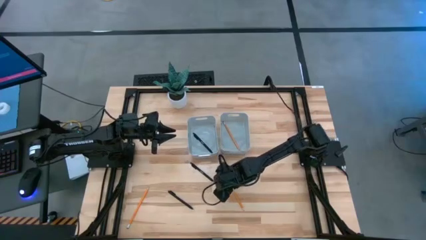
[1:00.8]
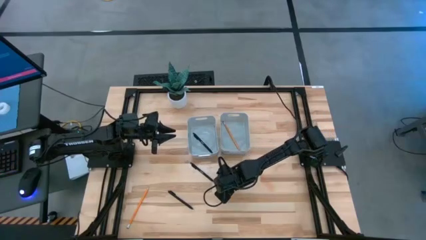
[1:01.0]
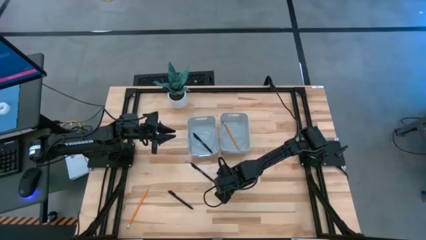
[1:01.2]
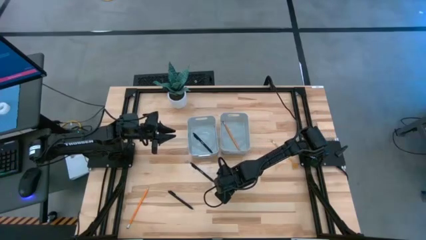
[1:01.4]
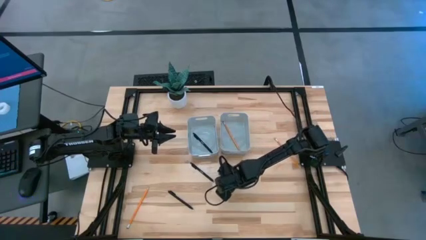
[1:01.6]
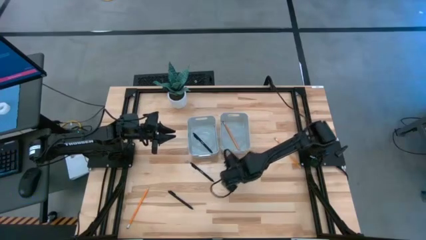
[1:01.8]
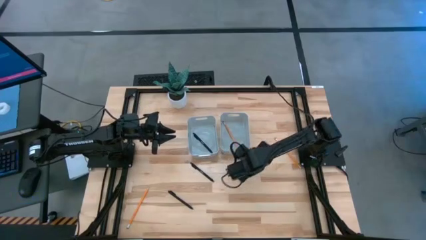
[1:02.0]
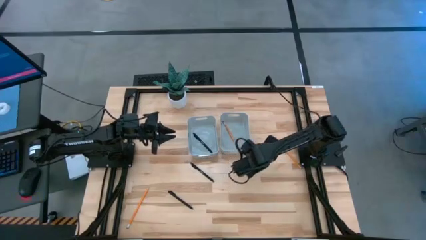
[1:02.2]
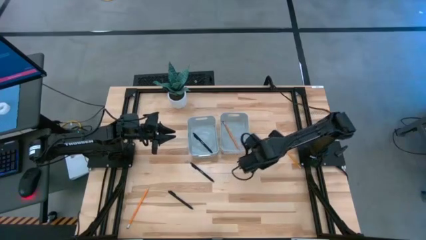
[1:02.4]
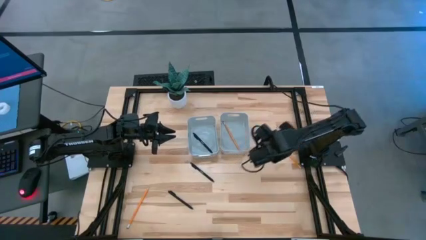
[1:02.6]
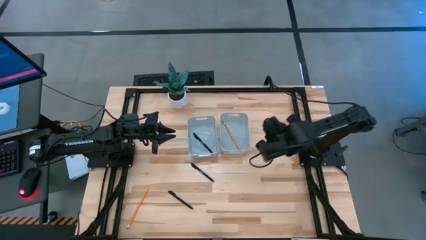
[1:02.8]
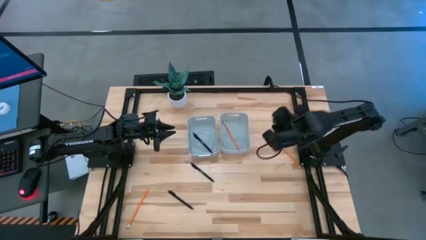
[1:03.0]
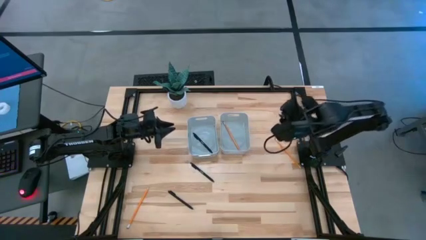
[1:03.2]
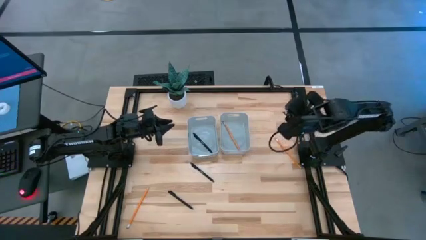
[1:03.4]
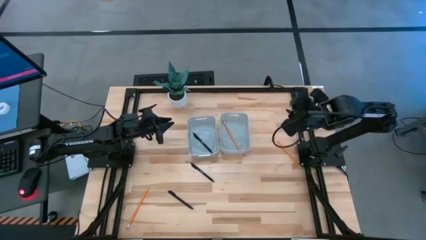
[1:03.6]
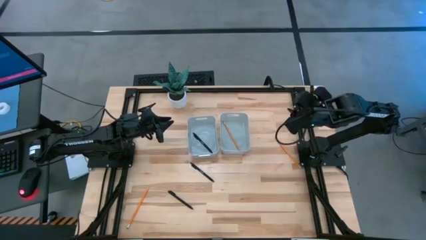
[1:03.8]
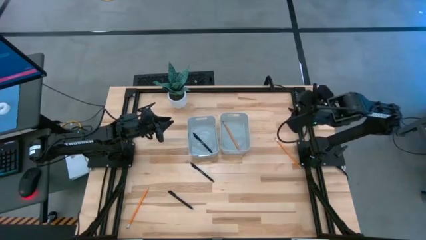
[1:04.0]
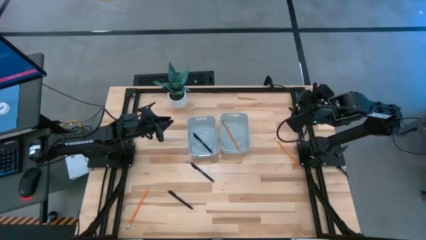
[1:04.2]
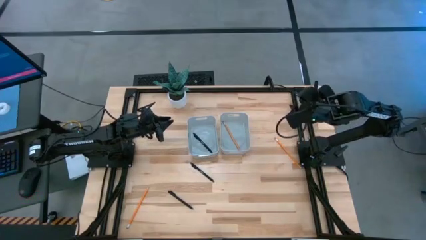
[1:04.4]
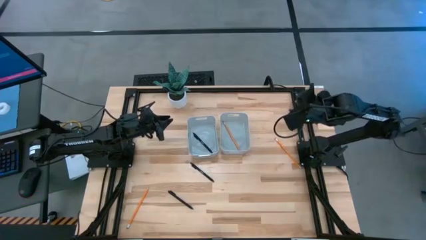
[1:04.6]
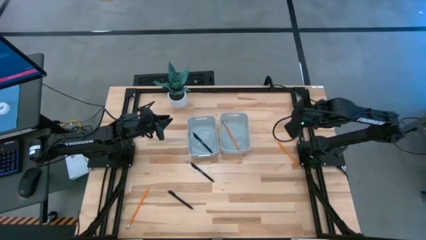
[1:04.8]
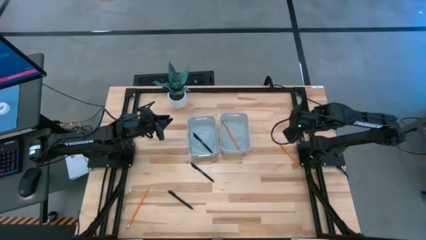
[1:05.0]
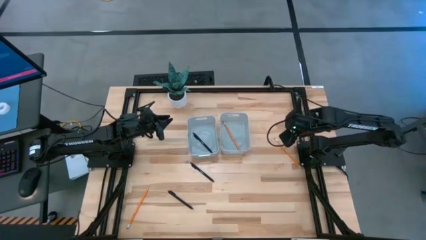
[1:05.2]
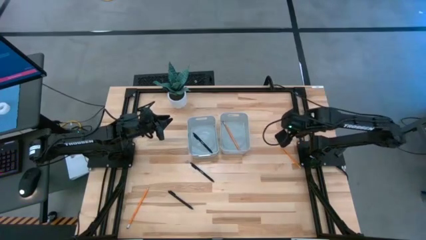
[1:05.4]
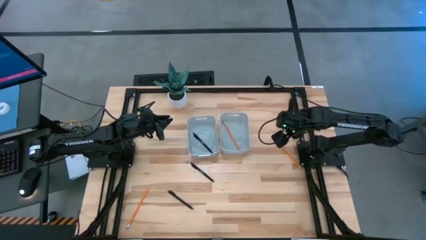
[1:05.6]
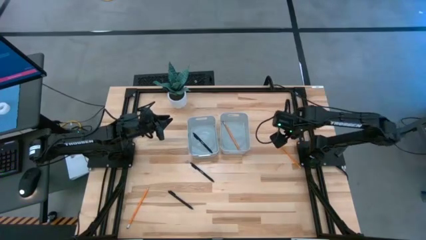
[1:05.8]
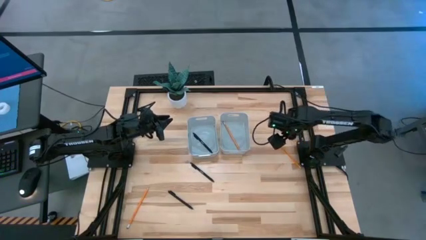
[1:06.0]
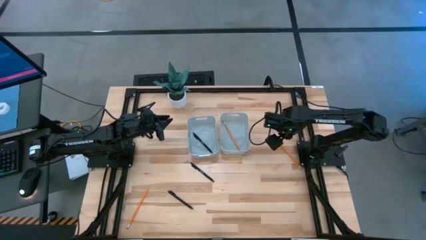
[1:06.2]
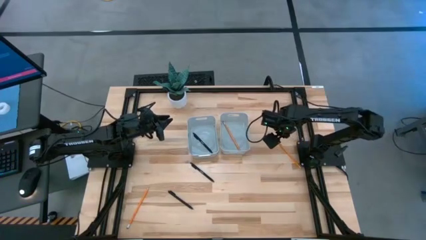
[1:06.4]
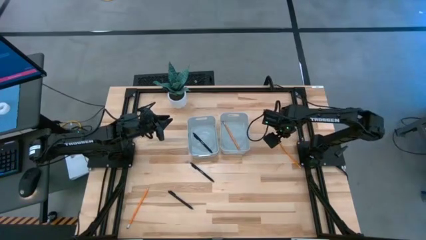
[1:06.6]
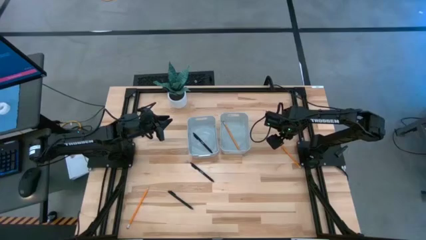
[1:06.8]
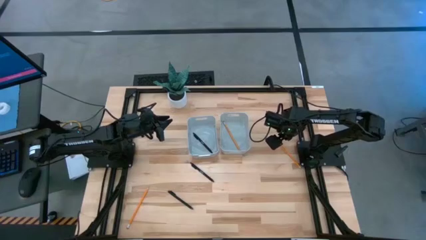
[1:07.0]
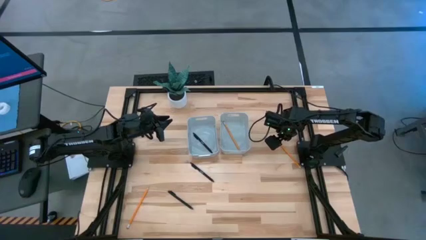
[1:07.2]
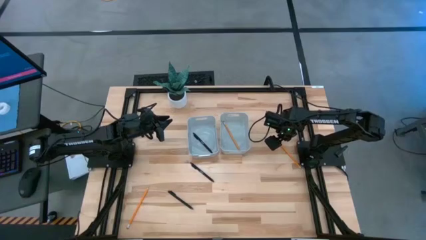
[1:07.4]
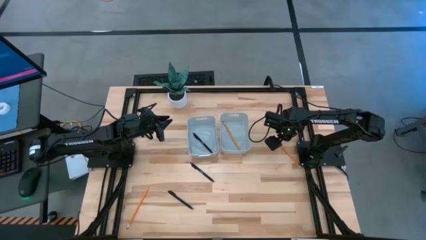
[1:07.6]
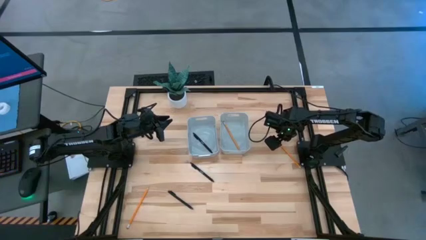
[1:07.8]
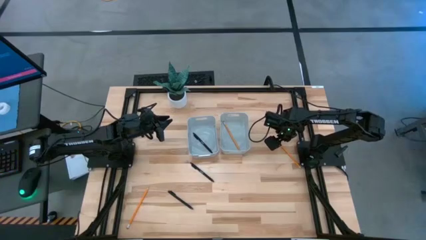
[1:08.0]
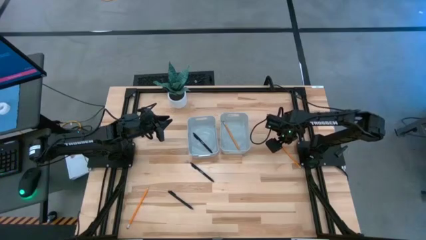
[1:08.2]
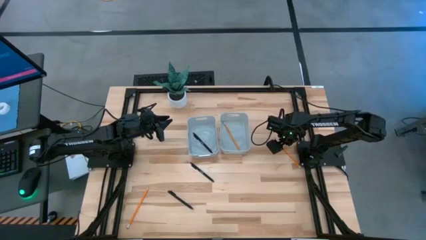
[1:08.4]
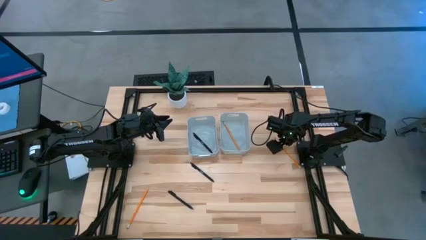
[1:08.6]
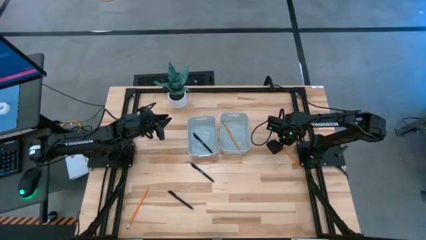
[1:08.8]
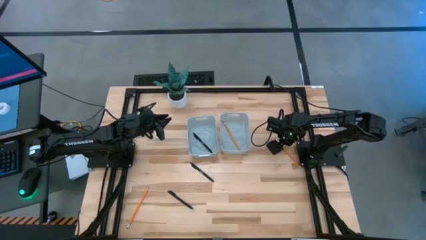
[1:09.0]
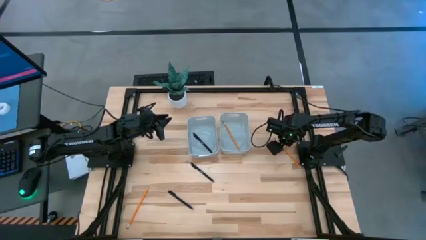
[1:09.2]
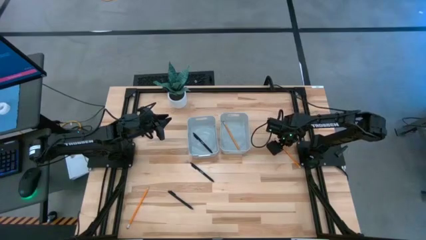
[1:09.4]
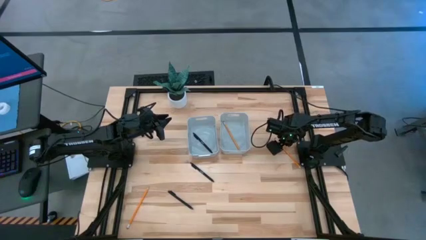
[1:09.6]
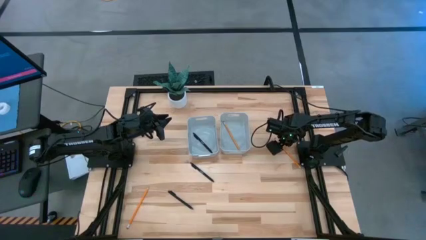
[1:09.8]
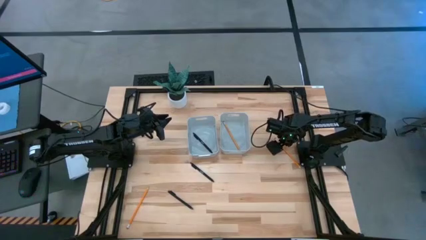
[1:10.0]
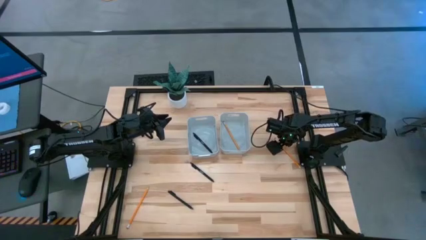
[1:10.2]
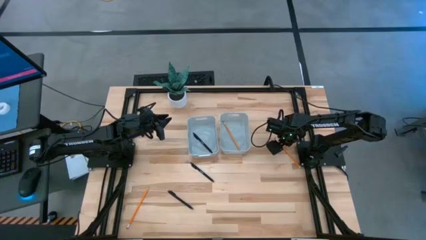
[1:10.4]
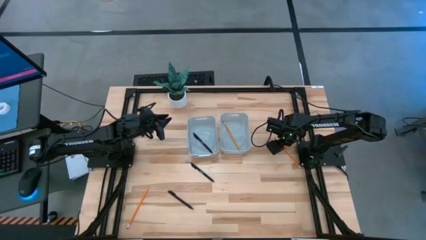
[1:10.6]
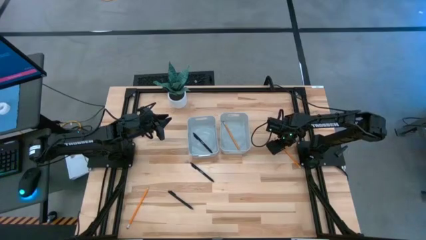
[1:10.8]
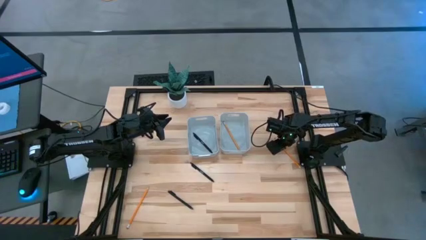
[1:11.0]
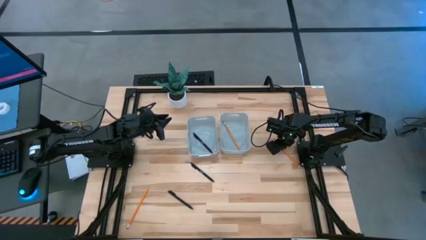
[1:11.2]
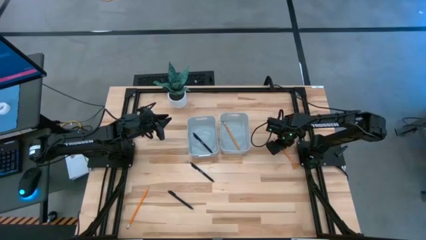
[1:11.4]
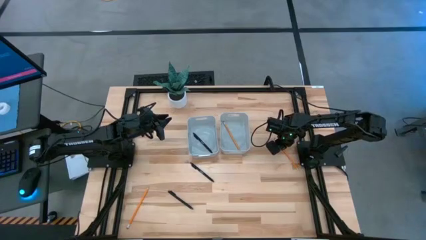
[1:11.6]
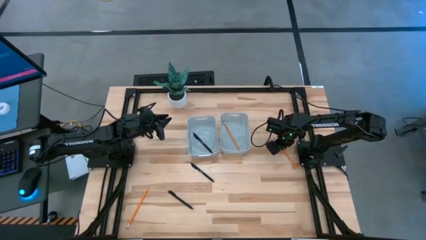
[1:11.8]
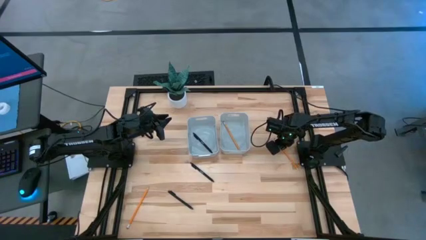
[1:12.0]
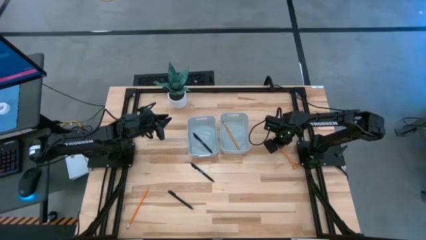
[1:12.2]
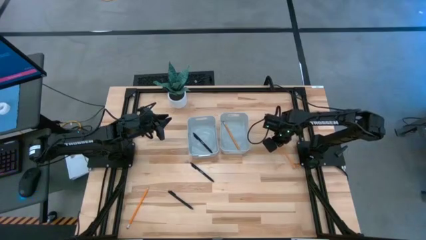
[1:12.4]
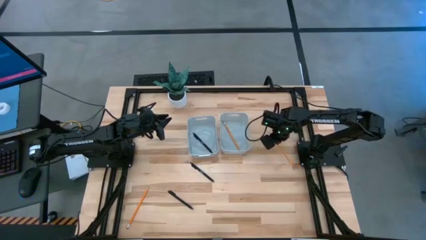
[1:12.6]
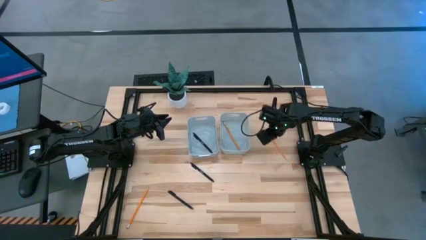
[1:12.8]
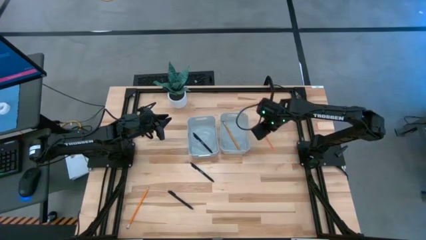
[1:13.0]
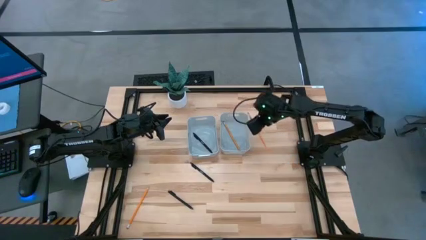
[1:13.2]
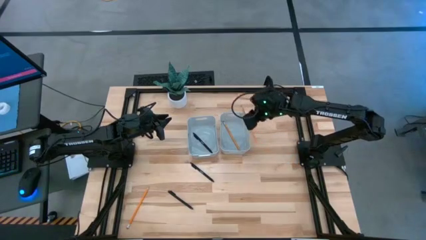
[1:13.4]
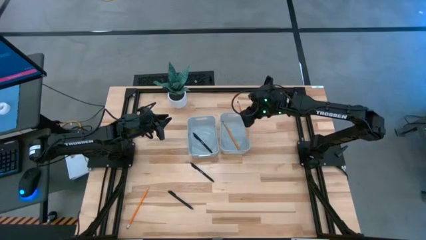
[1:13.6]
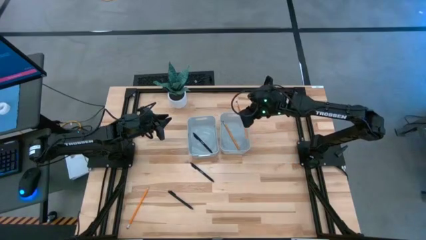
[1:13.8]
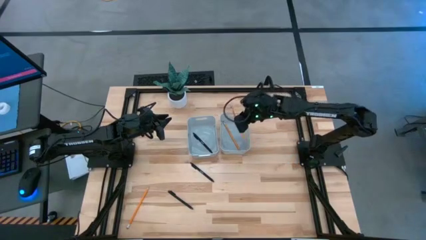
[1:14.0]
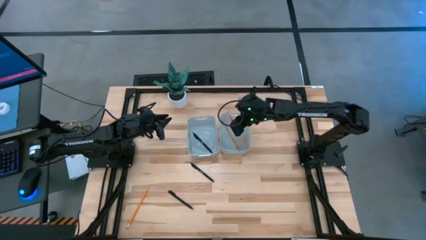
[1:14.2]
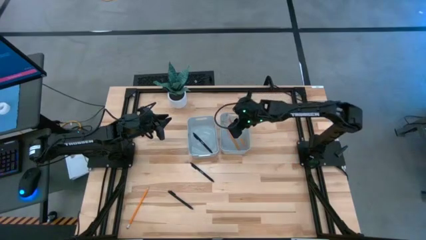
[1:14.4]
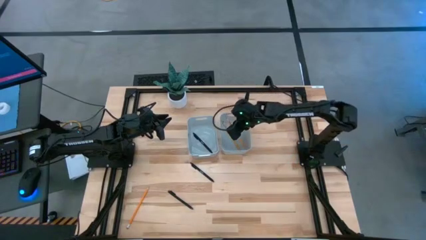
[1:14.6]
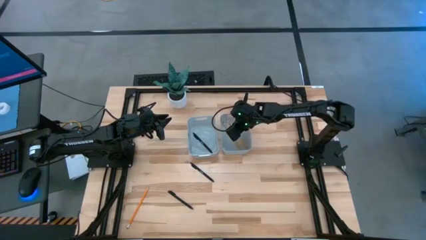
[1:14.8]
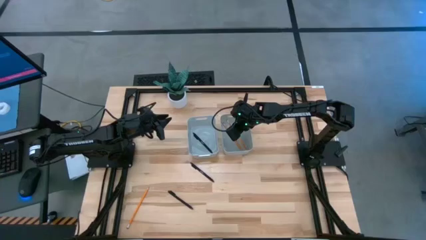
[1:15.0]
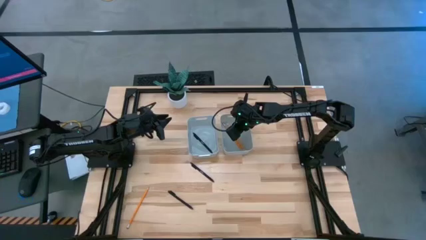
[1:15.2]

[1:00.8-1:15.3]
Task: Sort pens & pencils
Put the right orange pencil into the right gray bin

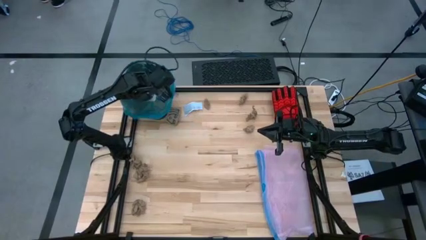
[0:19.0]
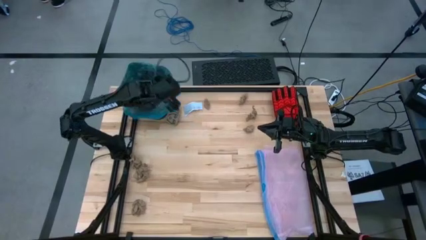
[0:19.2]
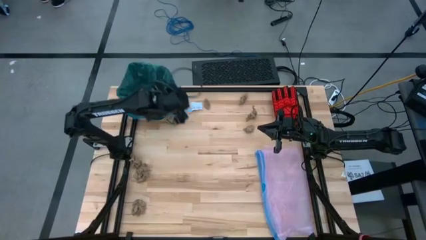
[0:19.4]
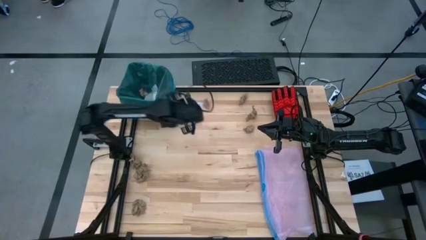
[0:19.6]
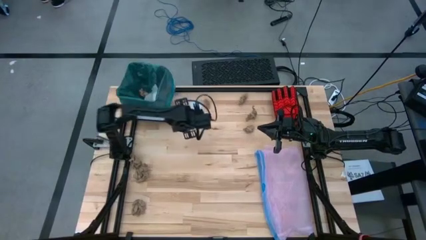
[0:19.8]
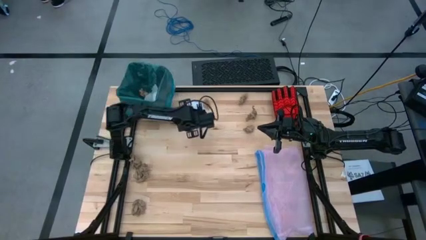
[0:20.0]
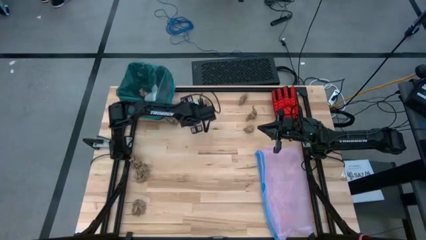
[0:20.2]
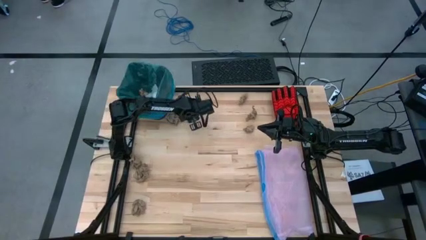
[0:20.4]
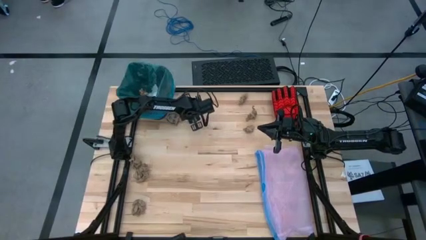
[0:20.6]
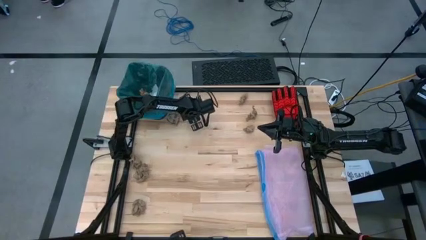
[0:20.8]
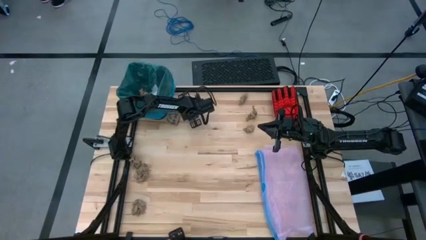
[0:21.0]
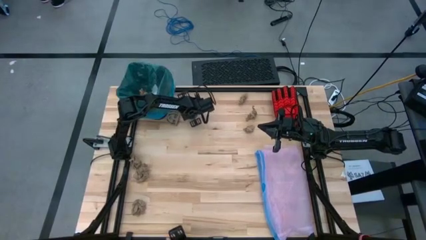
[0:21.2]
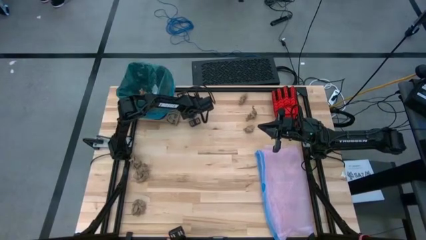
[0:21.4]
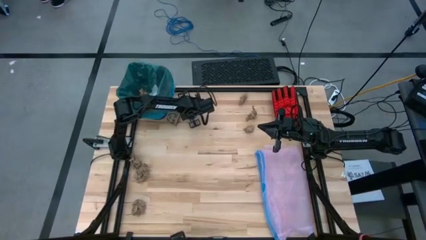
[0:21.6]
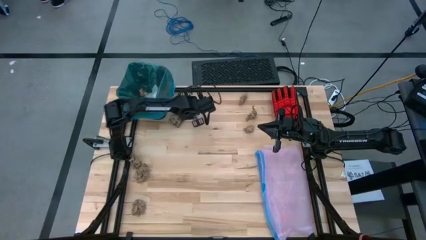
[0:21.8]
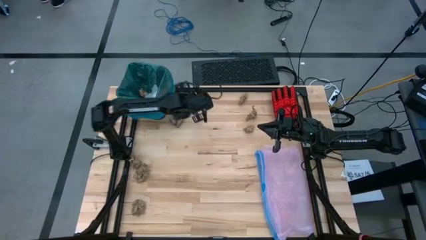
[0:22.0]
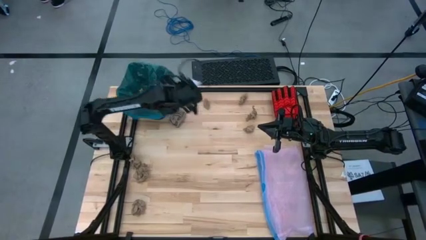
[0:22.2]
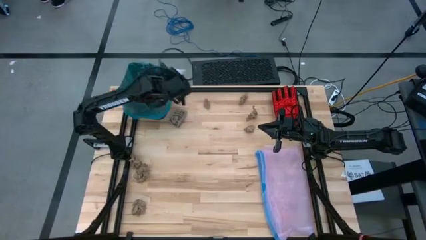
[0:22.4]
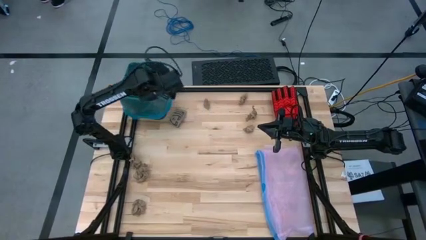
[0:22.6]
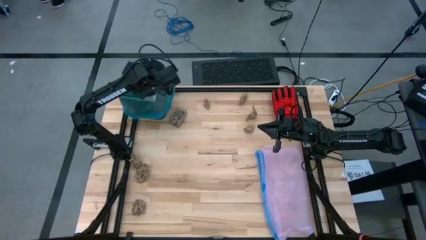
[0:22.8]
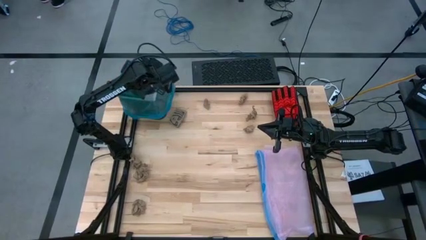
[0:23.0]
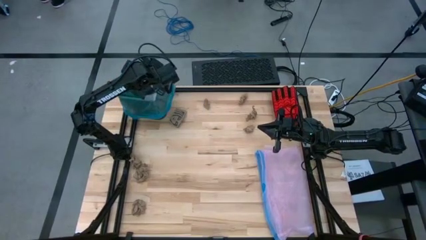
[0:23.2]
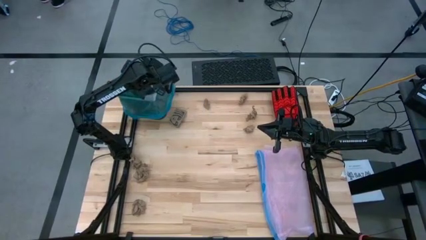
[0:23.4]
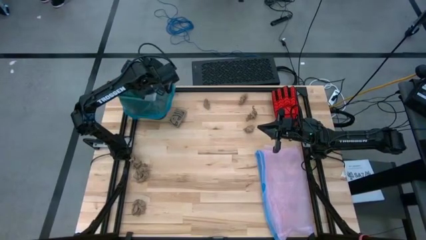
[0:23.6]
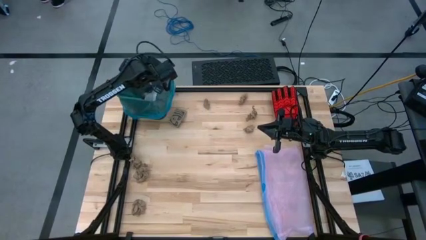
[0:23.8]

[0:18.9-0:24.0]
Task: place trash/remove bag and relplace
Put the blue paper into the black trash bin
